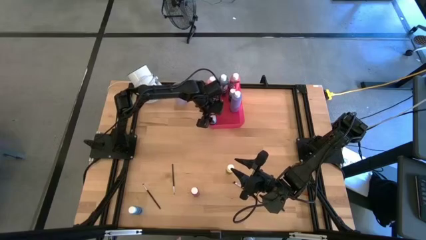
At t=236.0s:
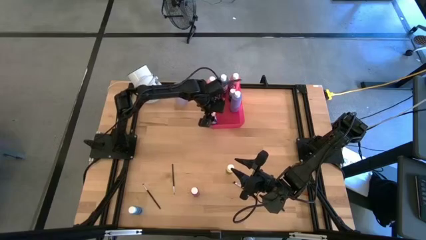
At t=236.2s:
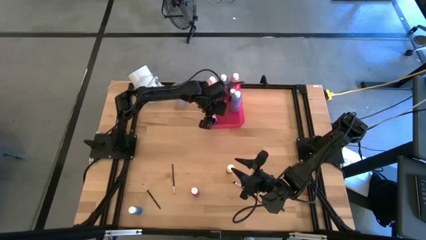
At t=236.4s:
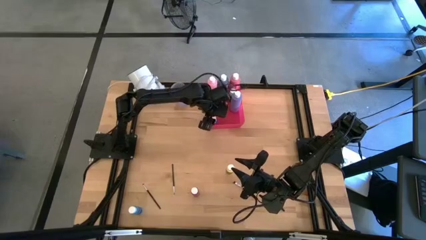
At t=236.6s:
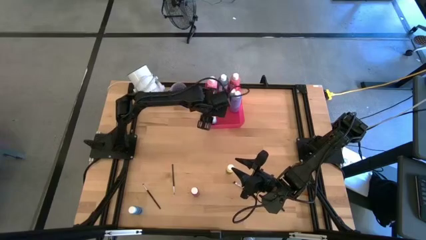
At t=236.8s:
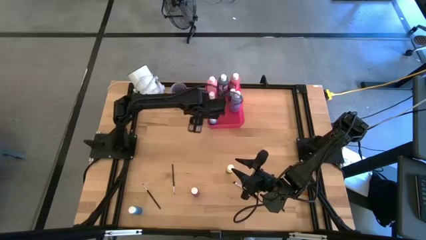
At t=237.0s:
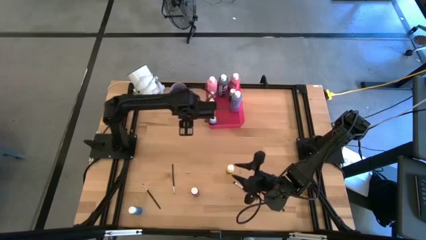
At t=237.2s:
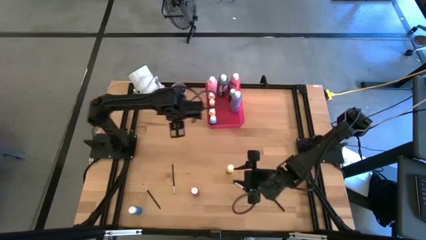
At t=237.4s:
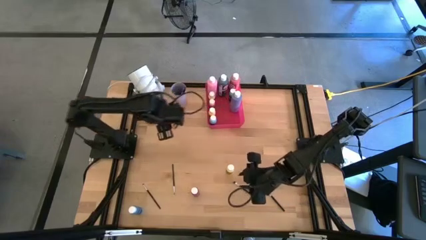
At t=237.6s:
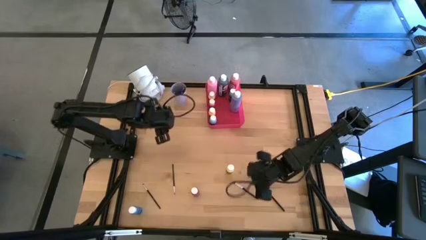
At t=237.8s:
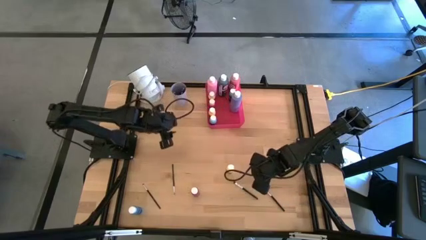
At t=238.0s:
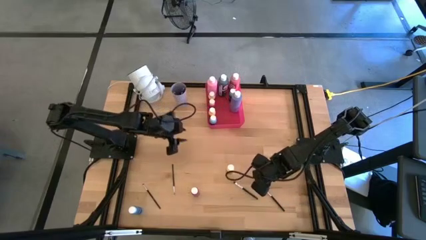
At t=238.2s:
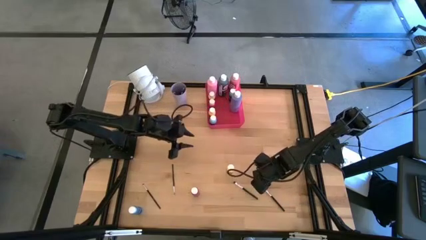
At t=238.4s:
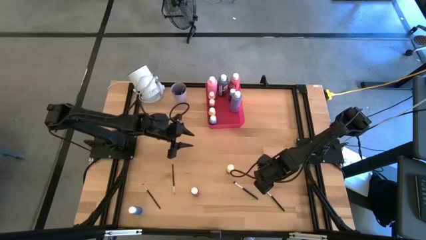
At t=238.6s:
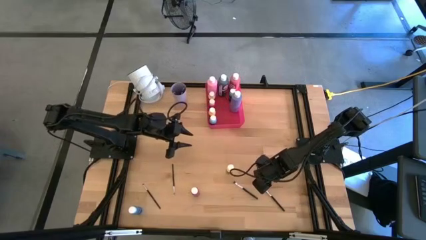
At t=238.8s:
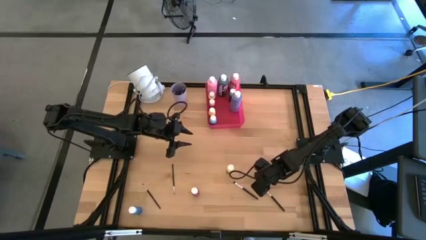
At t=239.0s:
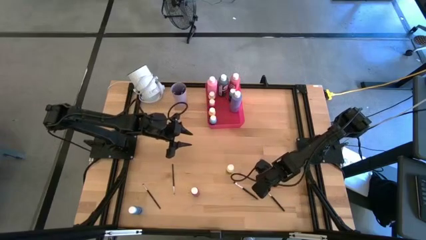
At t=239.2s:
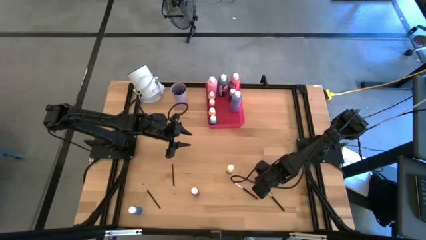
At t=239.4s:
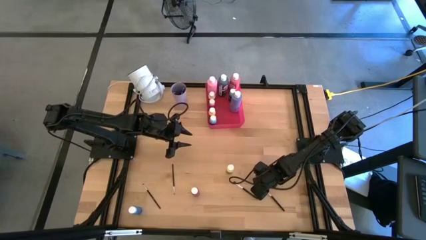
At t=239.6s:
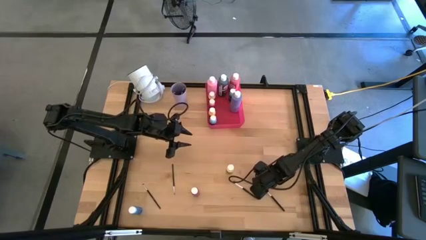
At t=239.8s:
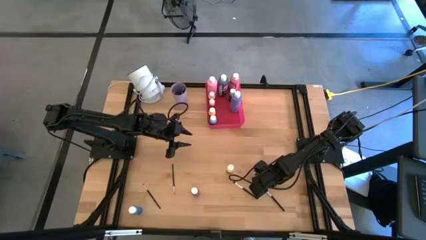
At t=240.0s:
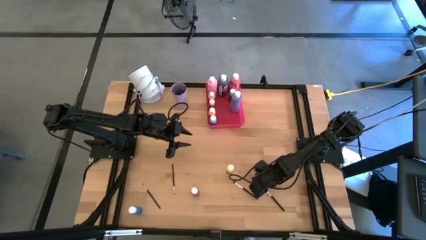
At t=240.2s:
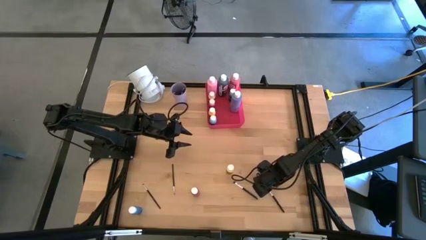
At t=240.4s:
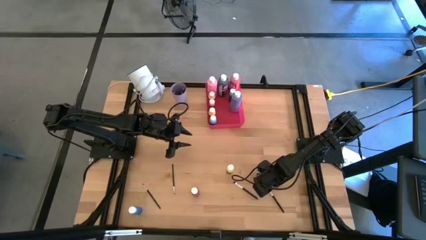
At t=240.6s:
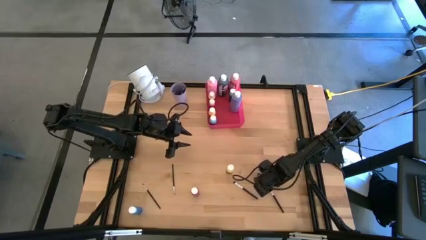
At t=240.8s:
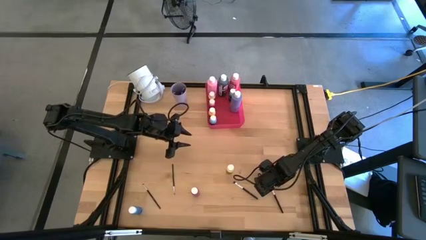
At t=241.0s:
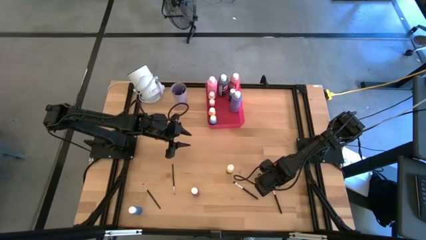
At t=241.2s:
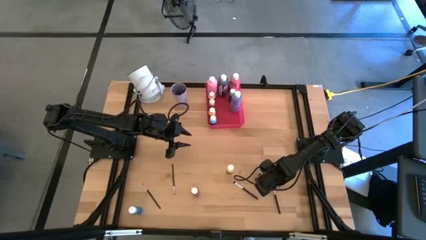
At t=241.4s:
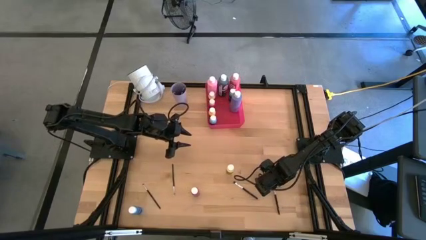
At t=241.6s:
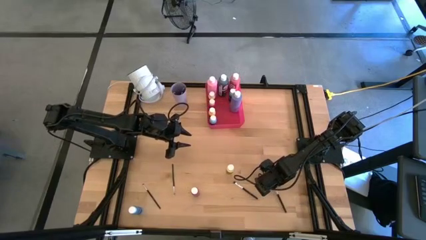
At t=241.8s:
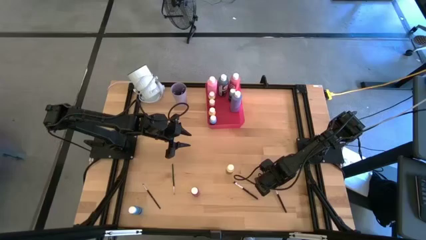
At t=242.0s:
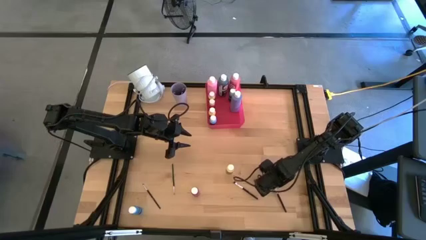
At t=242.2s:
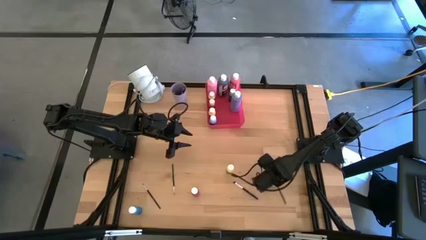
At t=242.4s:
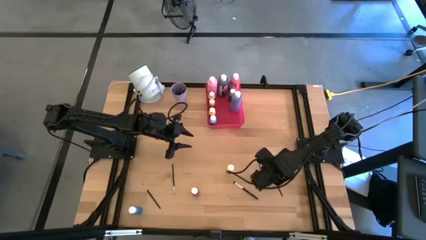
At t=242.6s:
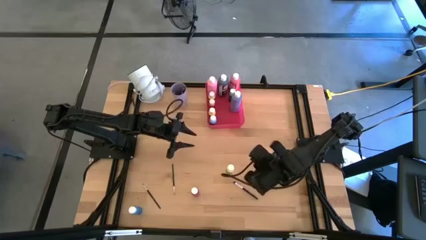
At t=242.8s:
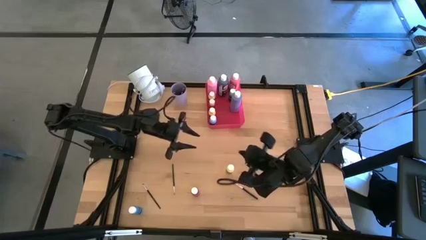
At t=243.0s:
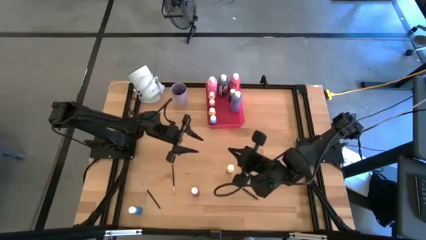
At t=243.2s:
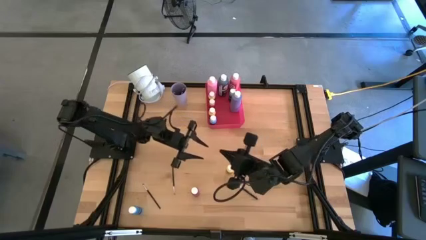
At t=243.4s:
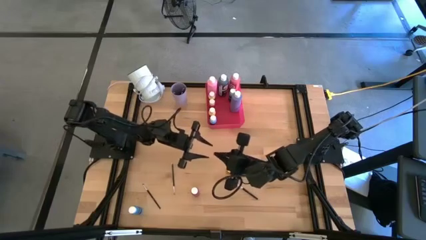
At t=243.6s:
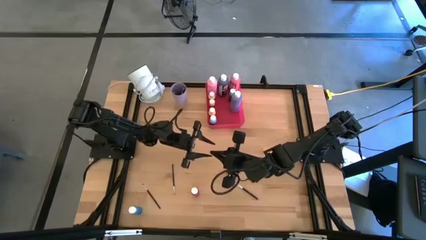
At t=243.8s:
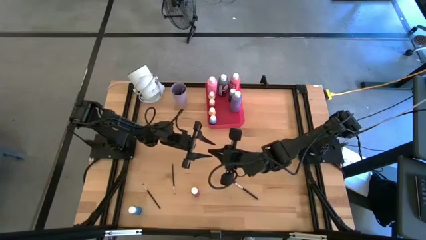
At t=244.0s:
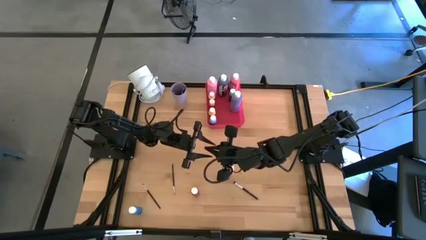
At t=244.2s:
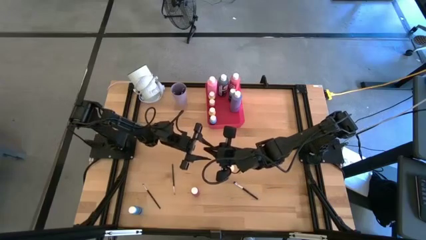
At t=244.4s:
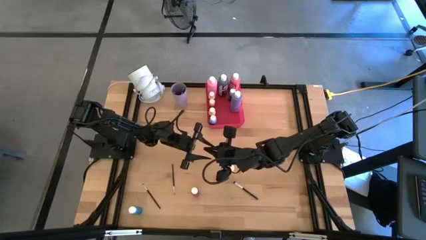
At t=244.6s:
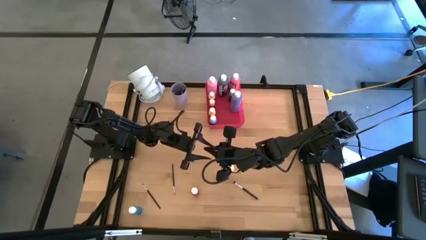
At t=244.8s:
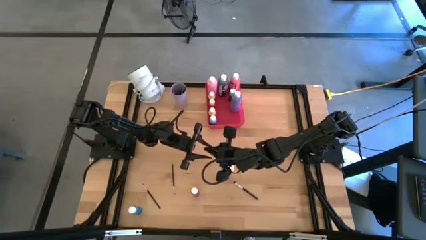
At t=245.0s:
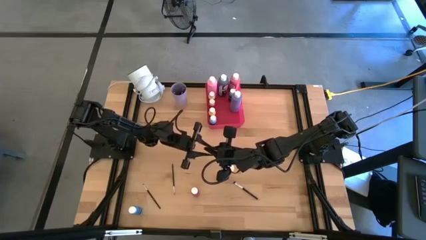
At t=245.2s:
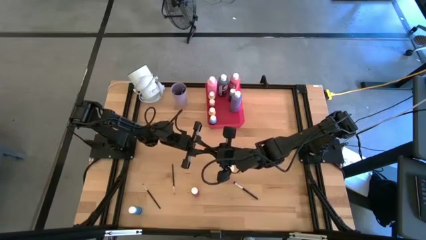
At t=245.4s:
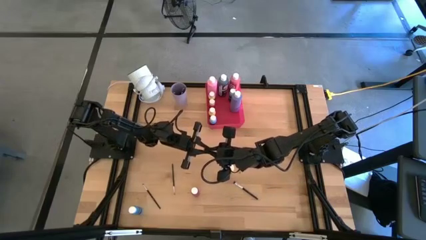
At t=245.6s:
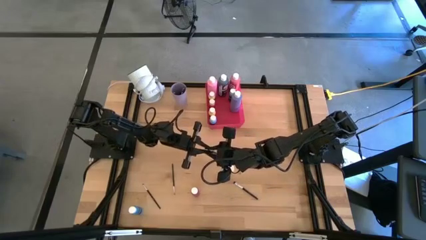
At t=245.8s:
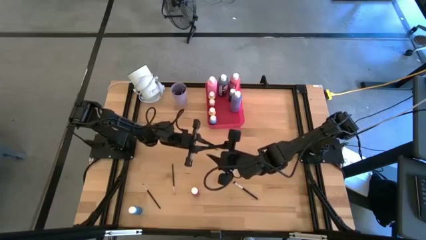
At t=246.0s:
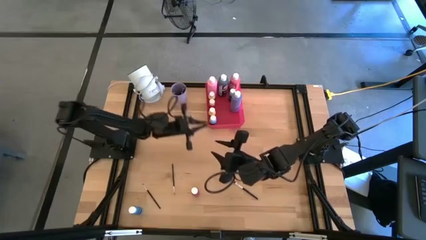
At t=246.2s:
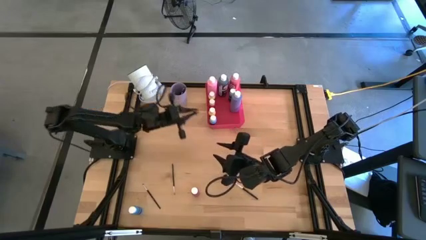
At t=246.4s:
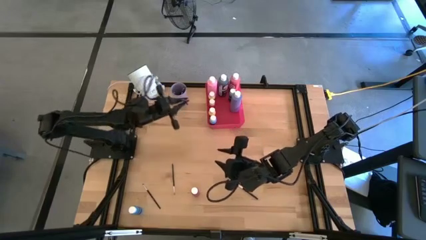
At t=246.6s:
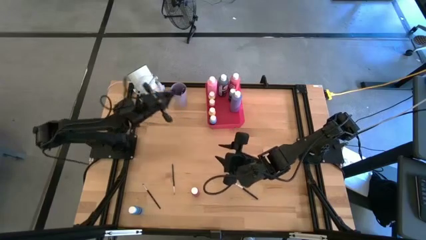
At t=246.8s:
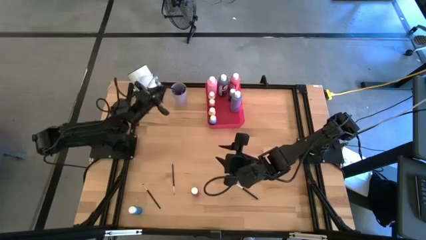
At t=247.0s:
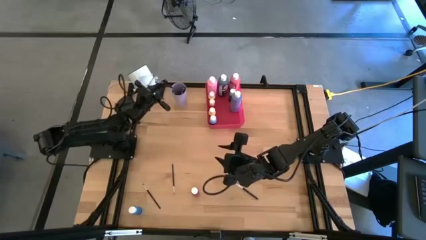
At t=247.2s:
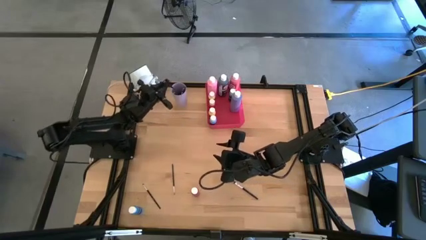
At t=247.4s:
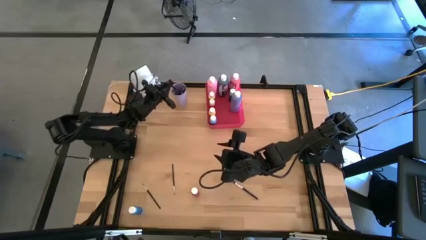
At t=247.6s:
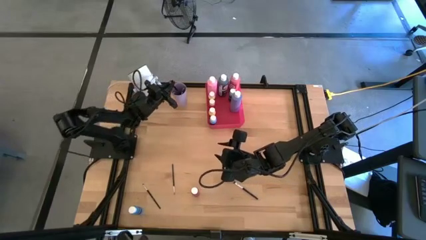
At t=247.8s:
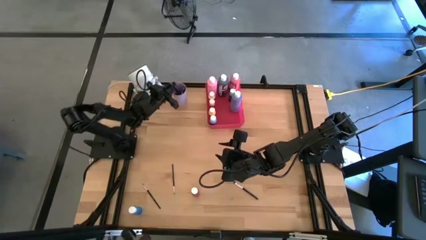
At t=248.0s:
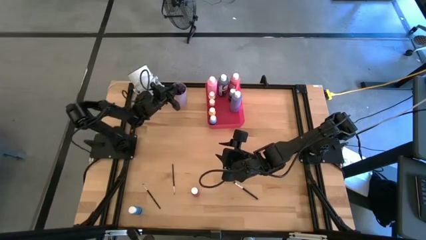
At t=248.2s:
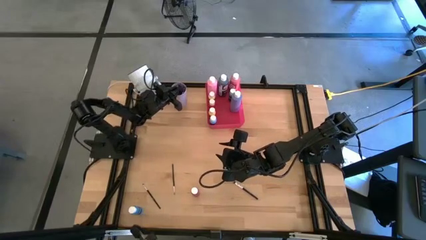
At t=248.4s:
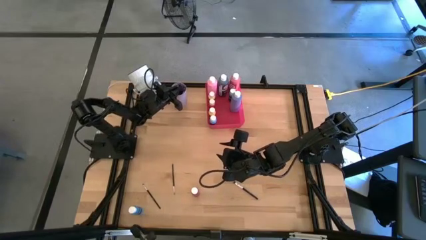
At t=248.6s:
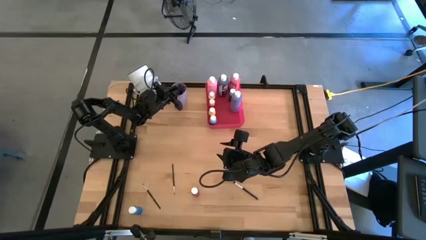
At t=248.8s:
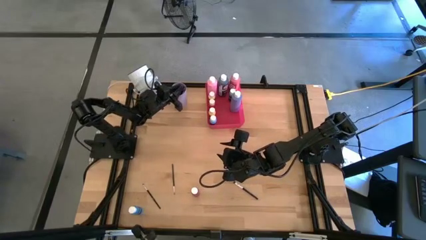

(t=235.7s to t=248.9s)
Task: Pick & Place Paint Supplies
Put the black paint brush into the purple cup

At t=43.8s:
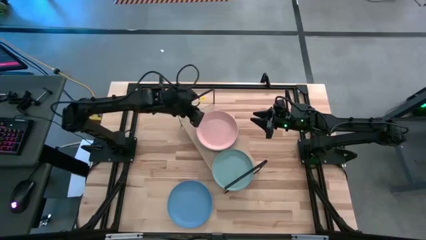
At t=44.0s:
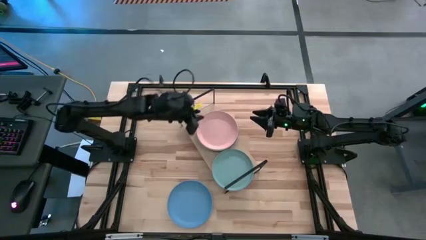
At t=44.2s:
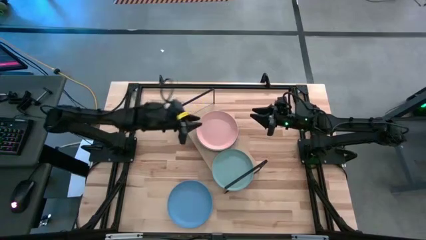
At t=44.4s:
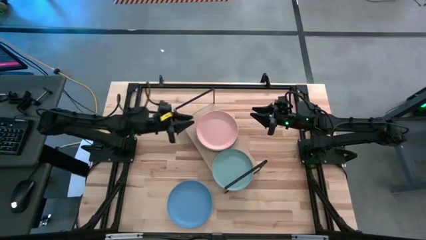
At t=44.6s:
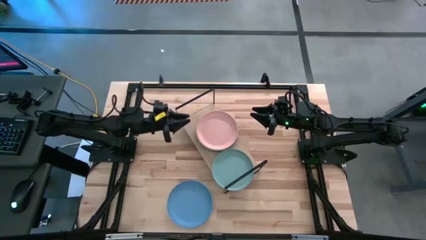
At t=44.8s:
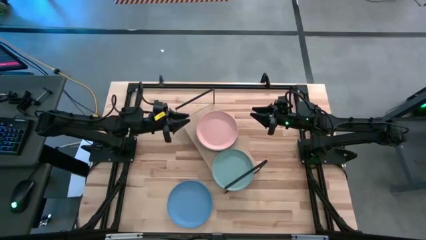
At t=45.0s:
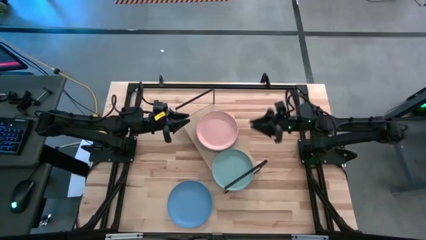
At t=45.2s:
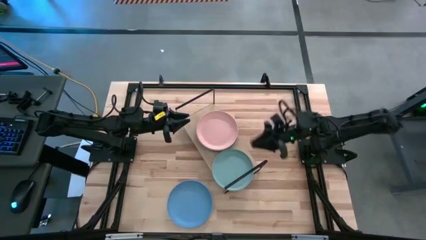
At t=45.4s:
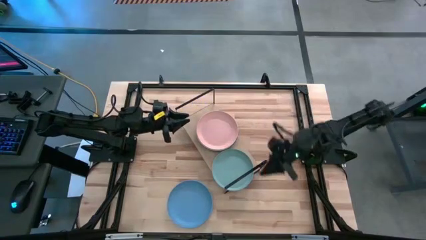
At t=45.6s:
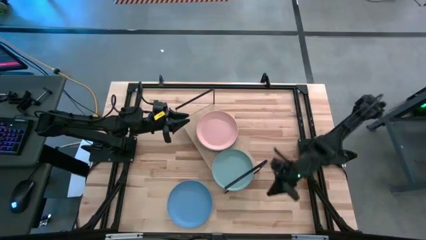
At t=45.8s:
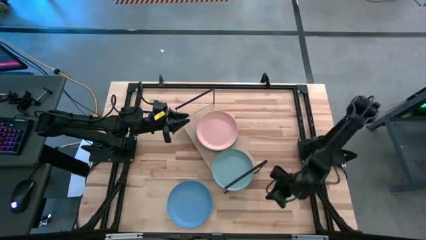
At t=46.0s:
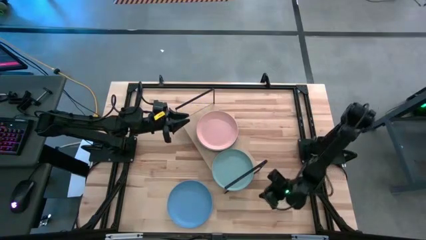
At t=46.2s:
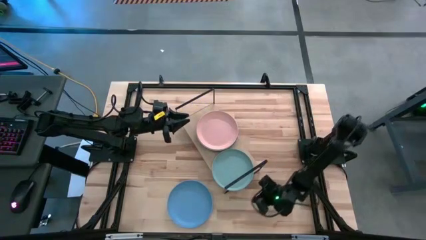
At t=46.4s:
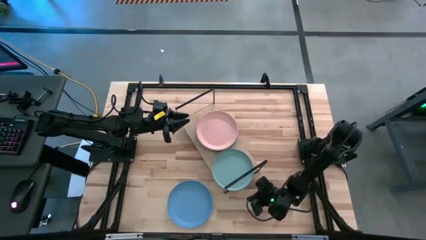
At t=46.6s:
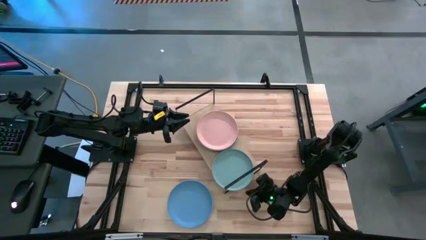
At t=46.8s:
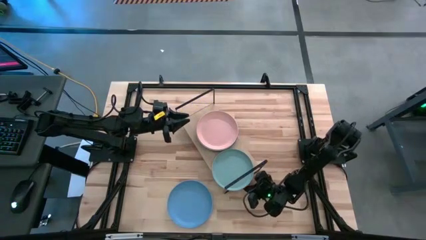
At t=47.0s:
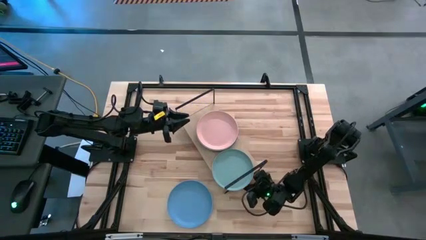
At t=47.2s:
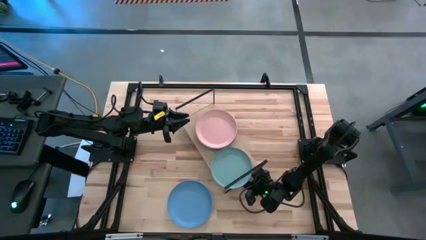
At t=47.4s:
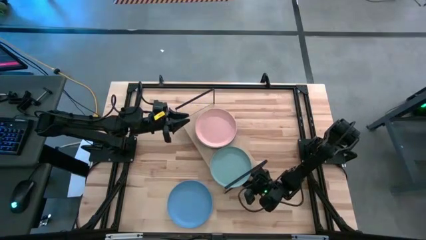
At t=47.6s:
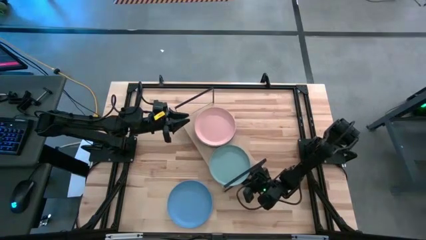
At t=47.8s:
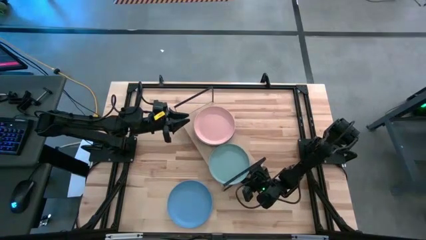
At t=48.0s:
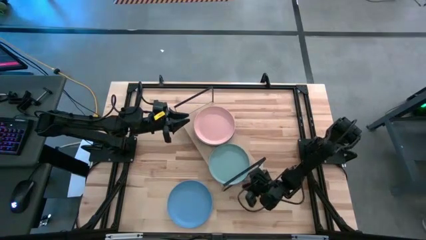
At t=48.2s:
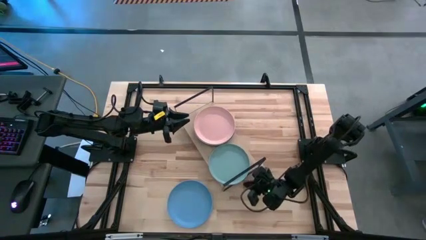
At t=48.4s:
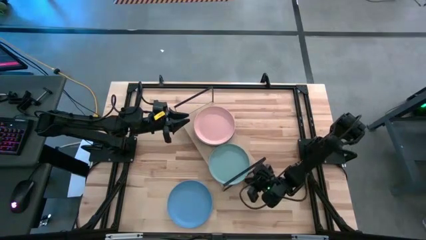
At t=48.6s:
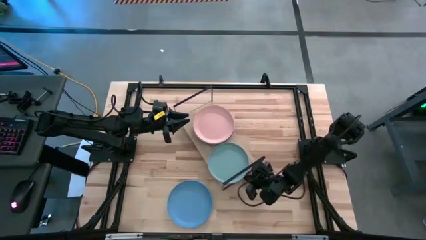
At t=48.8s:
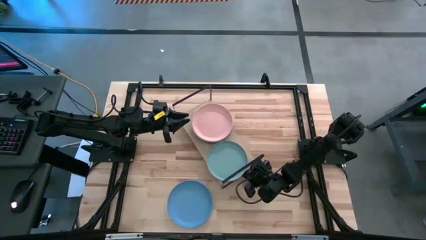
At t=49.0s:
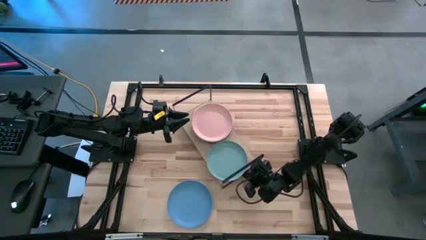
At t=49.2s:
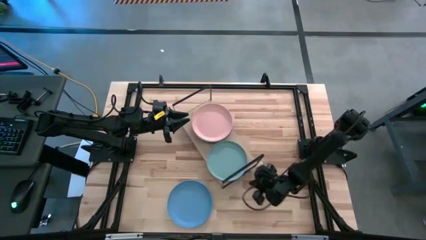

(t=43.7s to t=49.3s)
Task: Place and stack plates onto a shelf
Adjust the plates
